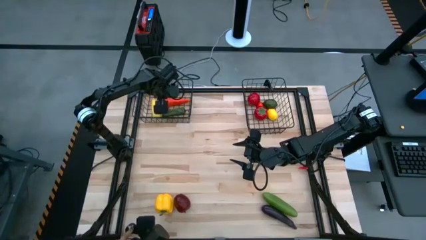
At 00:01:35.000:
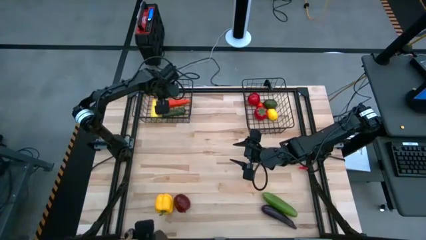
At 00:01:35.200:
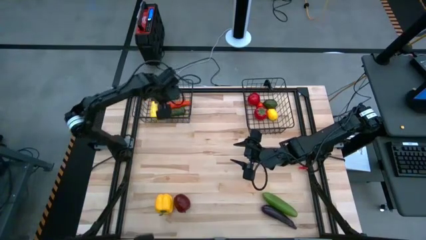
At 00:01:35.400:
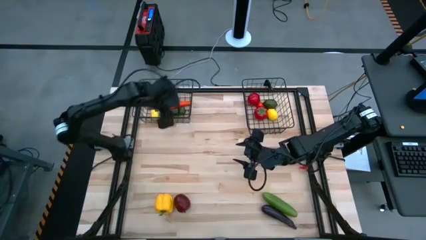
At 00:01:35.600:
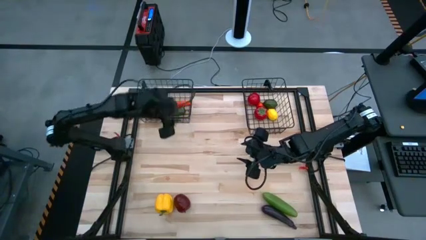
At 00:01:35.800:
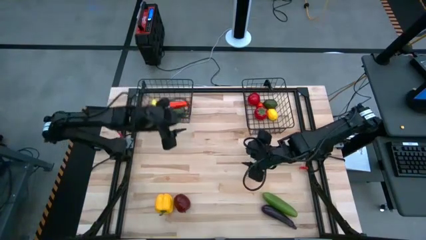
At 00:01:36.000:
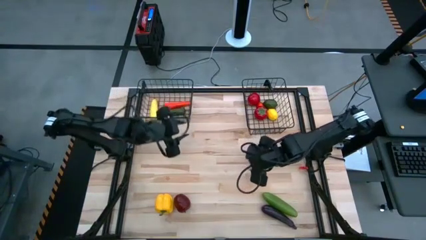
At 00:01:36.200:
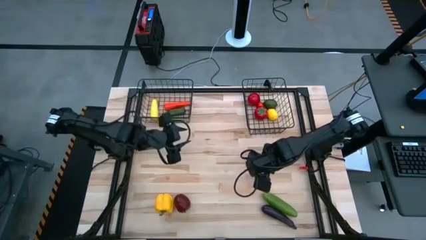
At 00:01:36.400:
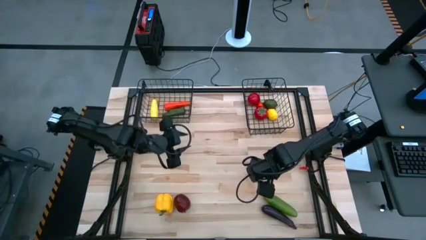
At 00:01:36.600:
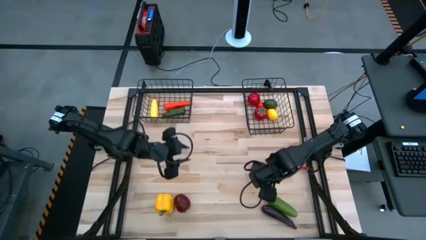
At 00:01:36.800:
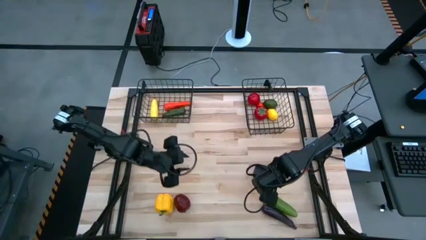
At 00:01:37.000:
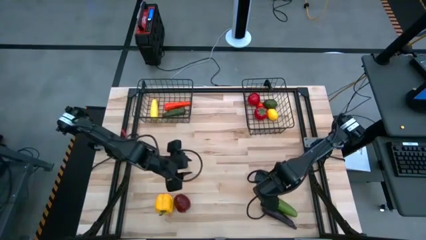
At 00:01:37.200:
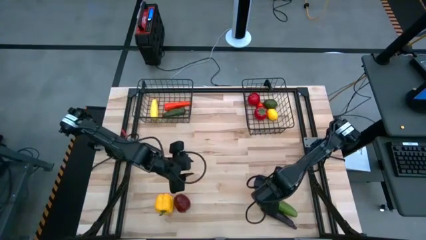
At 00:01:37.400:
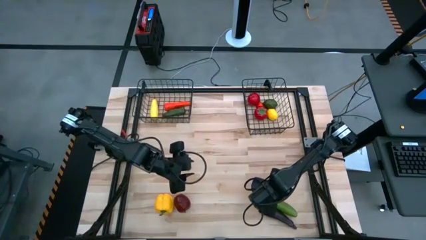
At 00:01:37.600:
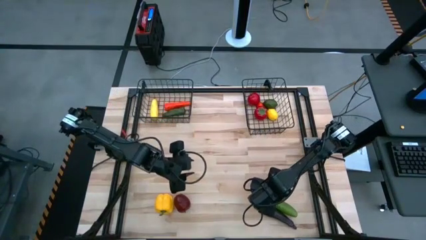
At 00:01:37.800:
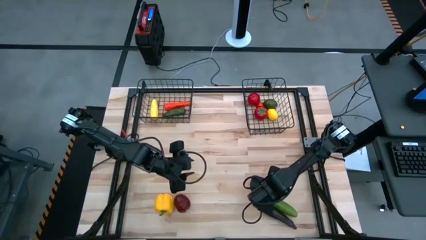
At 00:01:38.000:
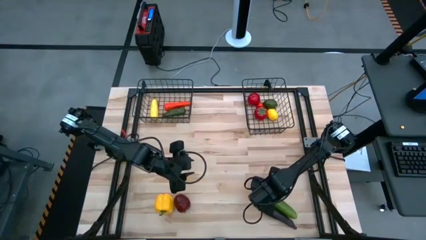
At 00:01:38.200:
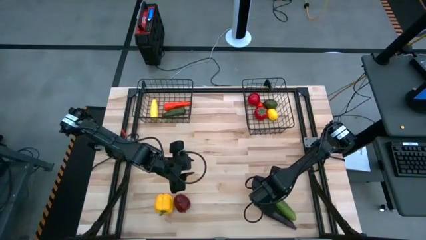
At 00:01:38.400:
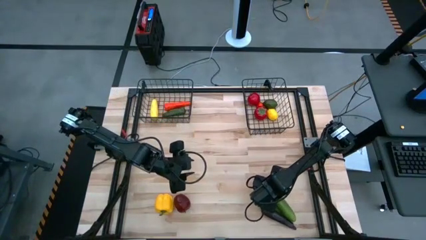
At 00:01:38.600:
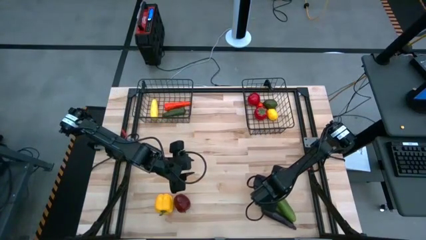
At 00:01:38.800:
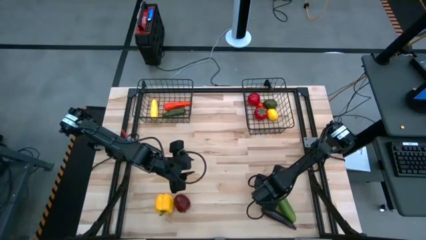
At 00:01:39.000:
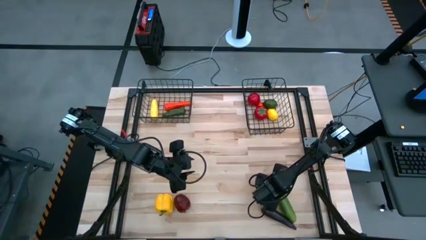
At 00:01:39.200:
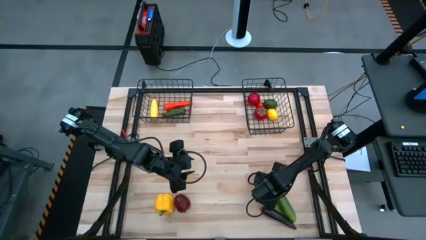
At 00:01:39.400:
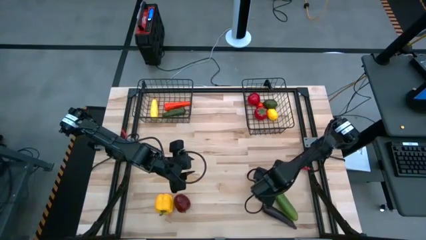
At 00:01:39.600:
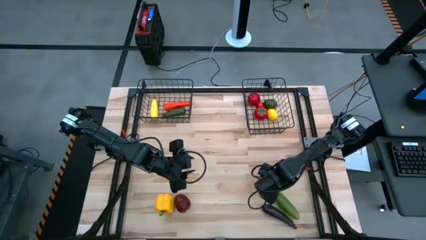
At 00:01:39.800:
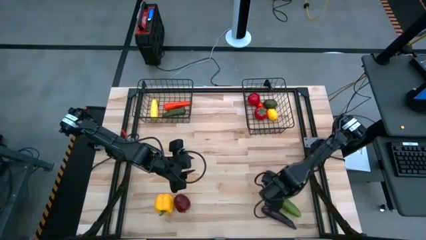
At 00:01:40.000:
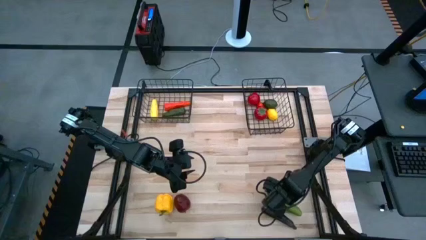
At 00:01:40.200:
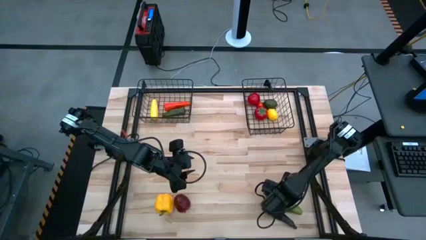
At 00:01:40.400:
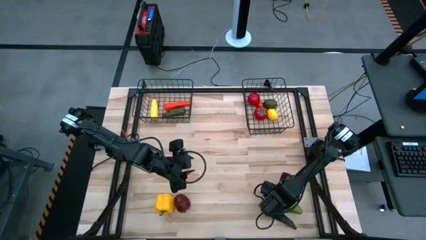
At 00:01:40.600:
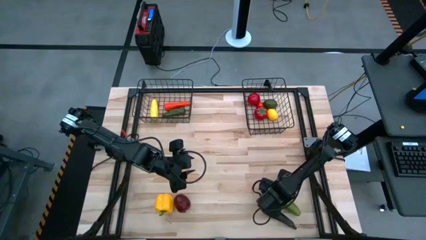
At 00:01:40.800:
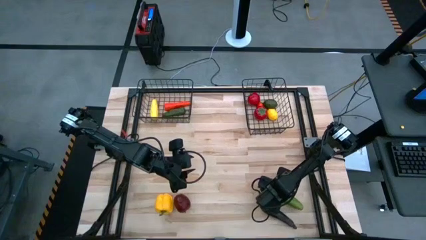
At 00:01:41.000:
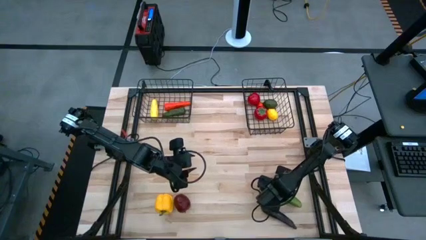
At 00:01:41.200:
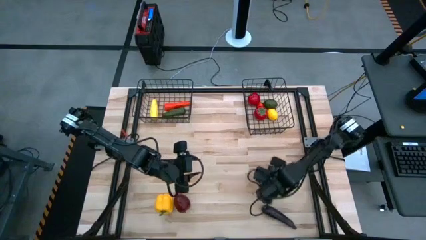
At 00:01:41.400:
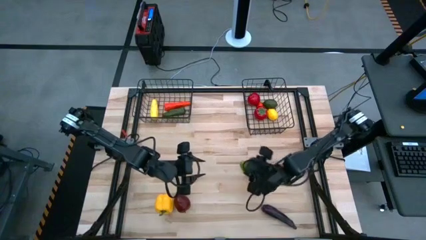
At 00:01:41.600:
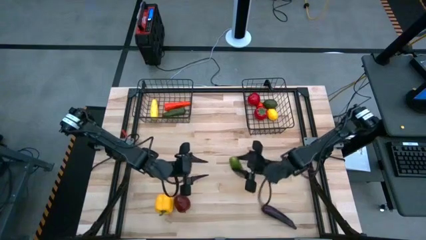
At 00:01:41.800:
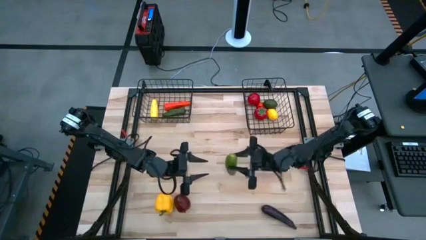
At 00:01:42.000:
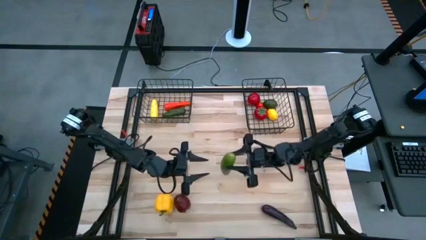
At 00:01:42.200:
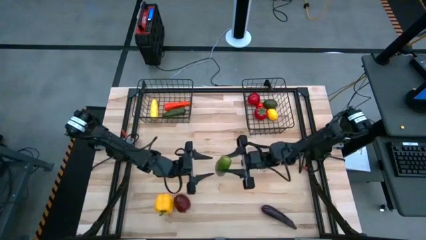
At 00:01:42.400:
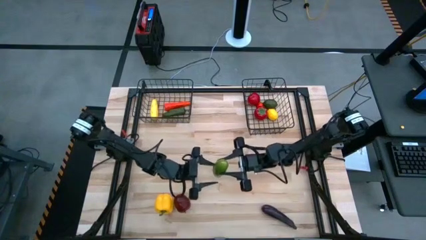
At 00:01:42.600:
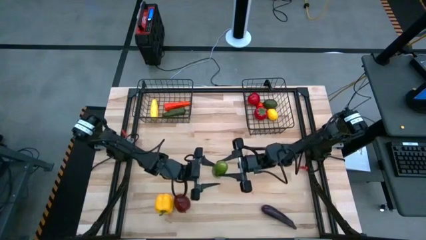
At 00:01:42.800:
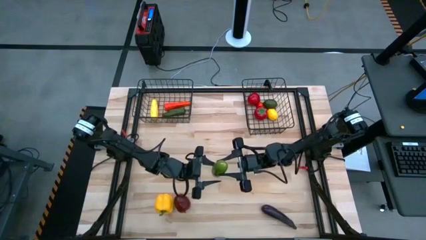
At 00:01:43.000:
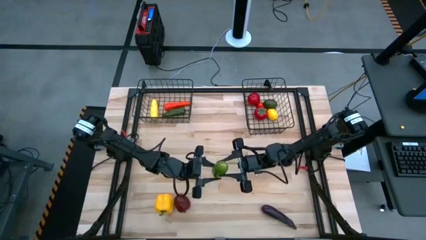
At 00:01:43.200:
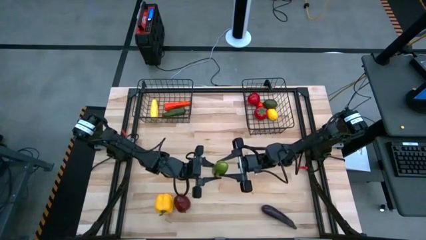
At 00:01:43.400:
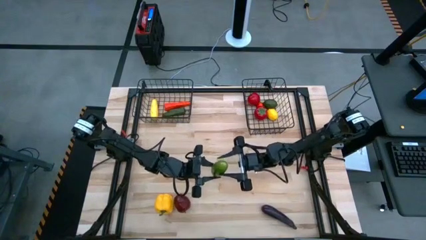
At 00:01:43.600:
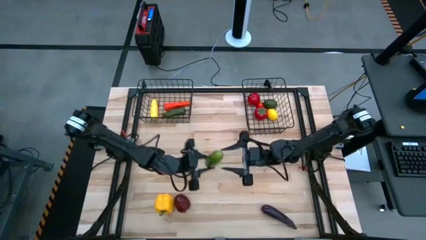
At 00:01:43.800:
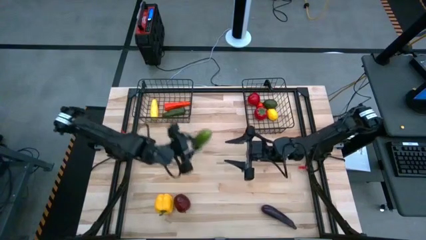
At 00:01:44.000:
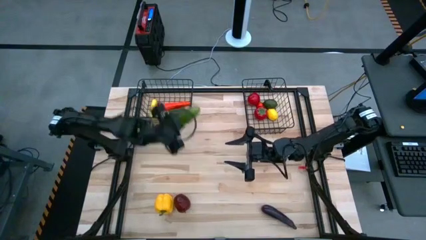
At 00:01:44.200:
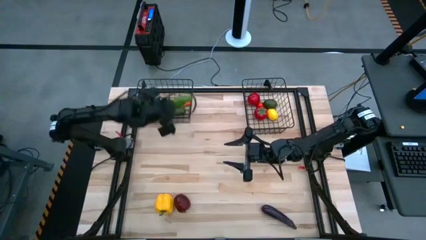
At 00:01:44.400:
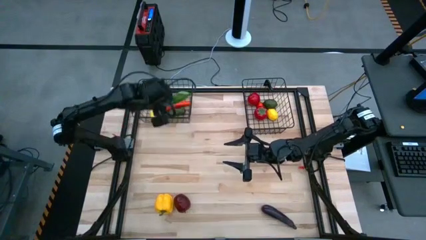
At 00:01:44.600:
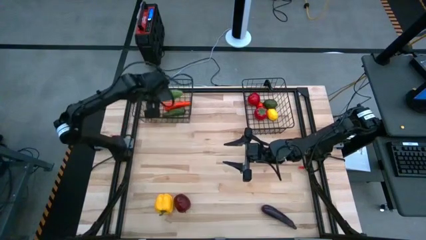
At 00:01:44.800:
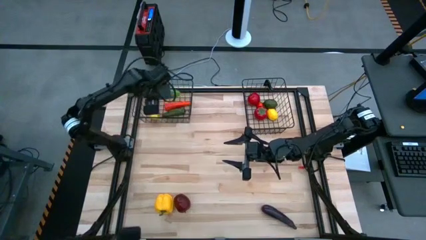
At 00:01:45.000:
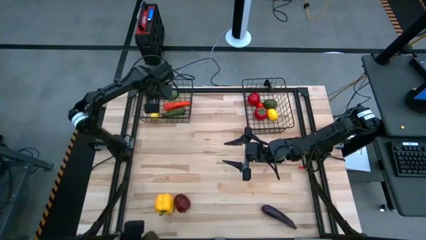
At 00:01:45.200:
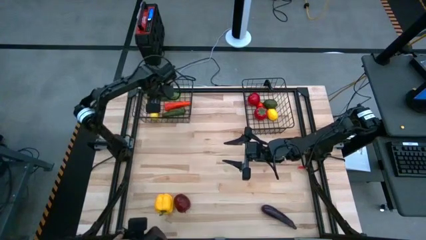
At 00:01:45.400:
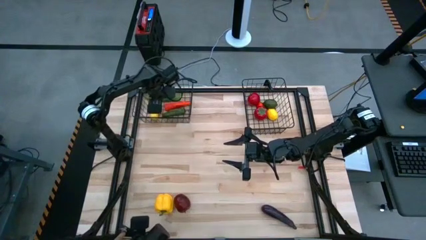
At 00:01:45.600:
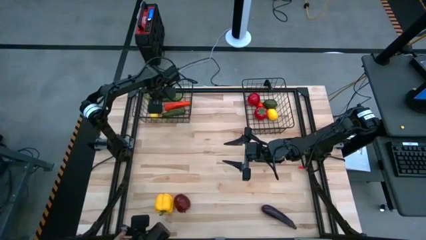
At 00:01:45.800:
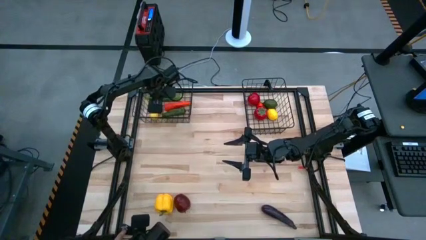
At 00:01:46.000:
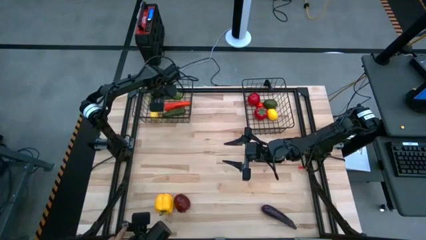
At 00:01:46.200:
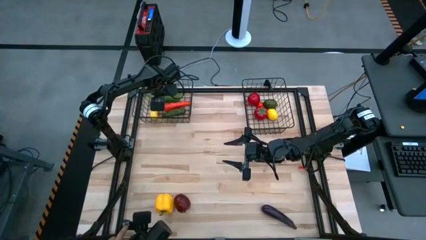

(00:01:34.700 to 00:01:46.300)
Task: Sort produce into baskets
Put the green cucumber into the left black wire basket

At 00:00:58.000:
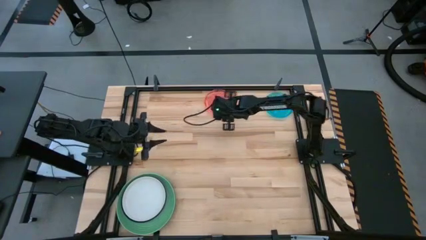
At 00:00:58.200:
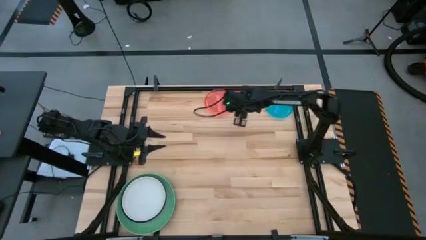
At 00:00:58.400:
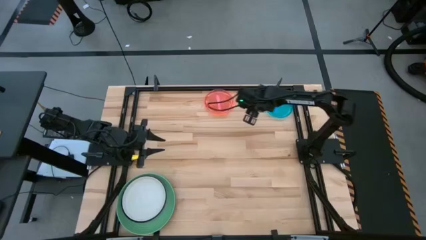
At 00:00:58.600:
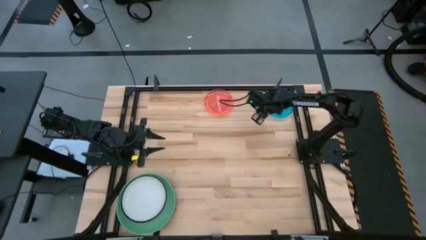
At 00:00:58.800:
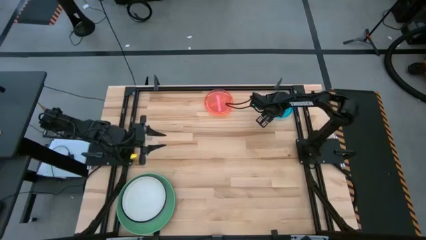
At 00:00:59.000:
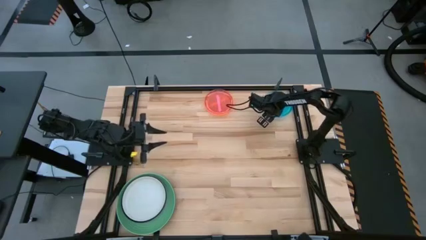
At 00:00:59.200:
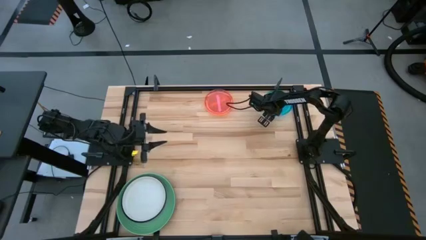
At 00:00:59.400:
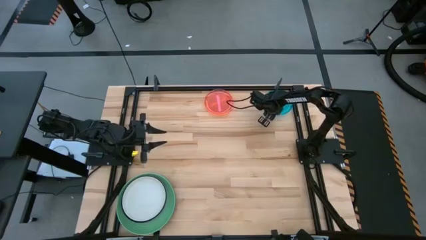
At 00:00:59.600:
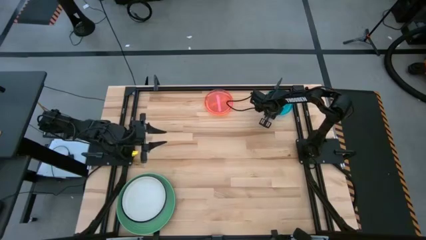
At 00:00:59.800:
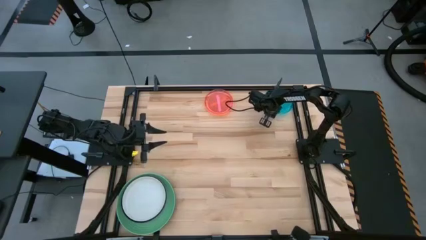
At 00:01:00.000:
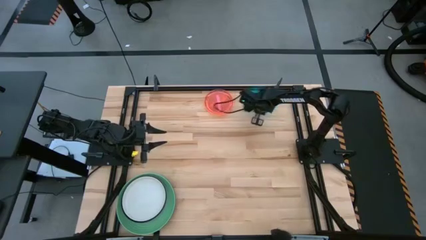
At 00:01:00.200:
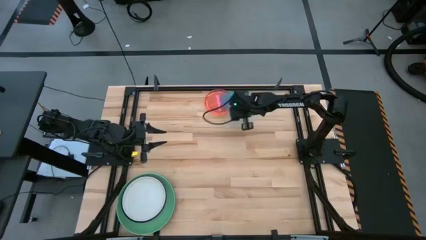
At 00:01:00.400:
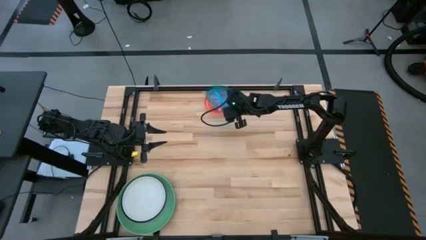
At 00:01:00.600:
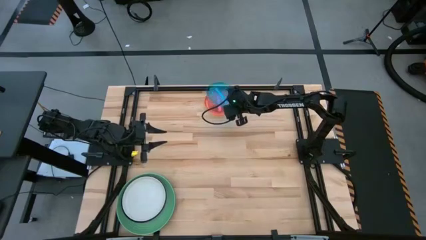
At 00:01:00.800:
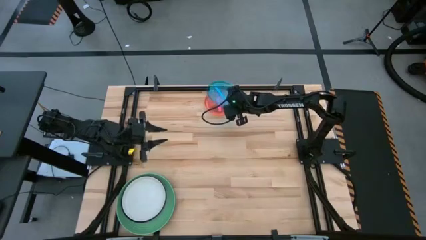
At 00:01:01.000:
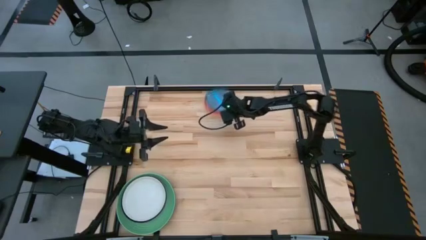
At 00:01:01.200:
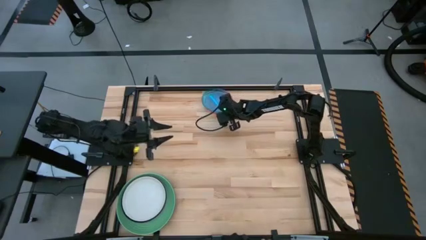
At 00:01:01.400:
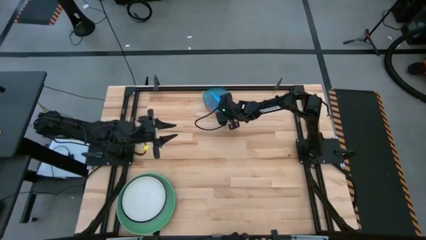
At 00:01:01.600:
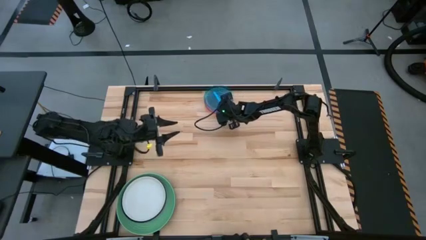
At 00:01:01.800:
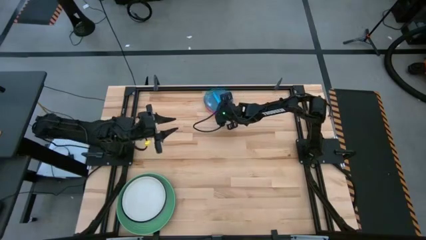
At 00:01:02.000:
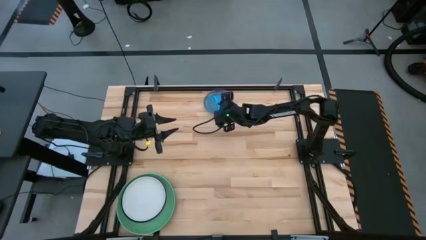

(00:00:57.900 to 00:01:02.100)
Task: Stack plastic plates
Stack the blue plate on top of the pink plate
